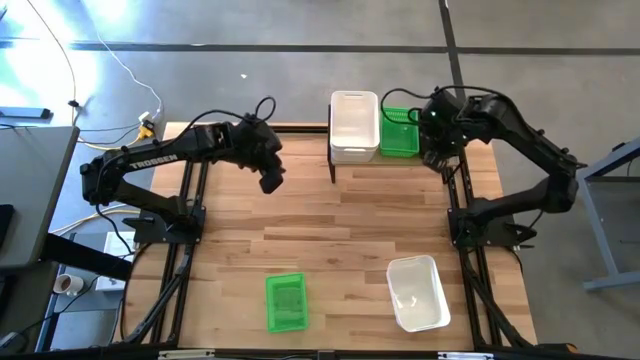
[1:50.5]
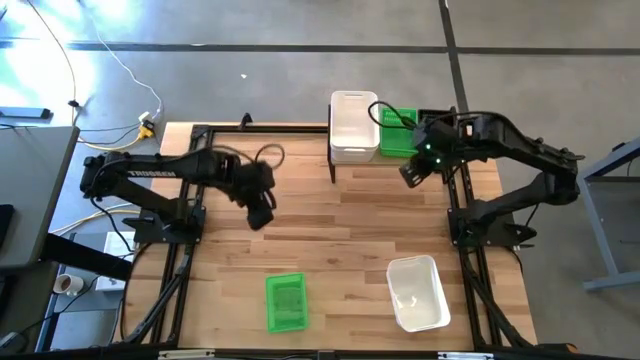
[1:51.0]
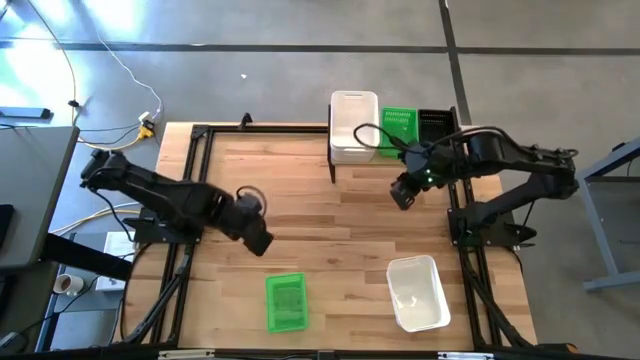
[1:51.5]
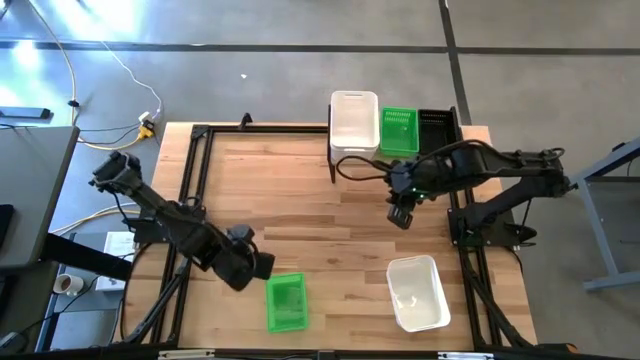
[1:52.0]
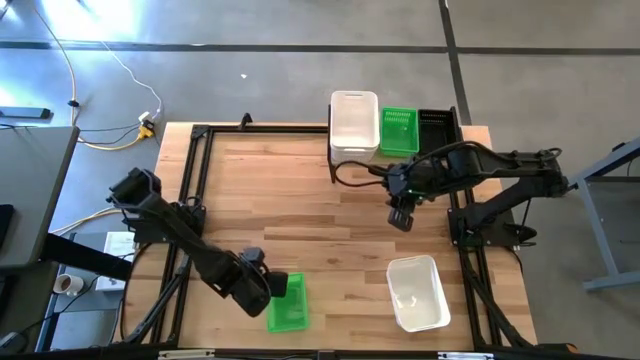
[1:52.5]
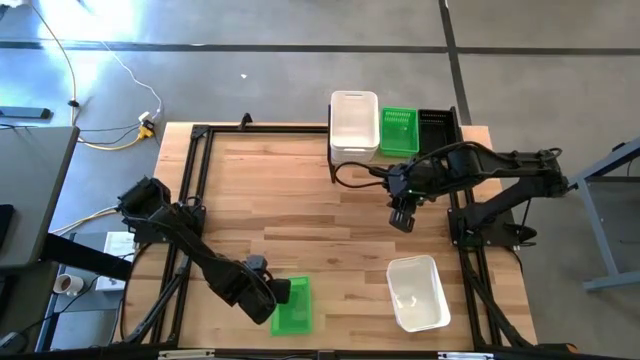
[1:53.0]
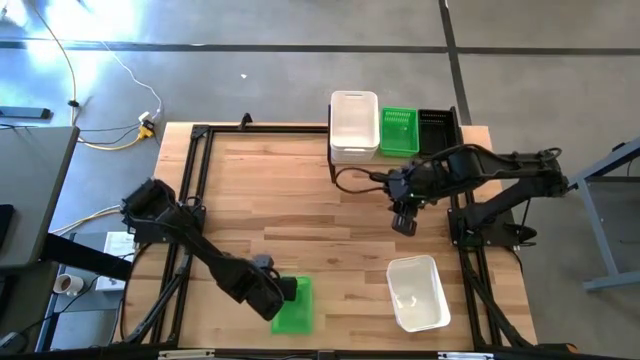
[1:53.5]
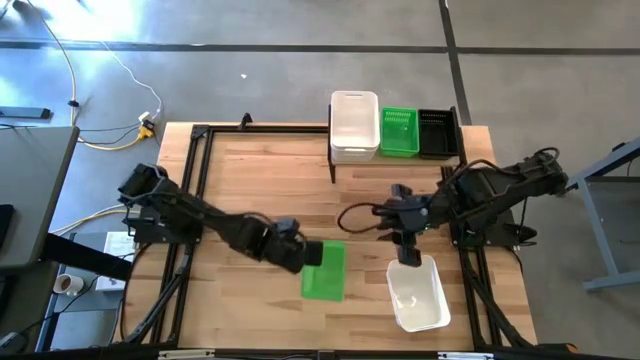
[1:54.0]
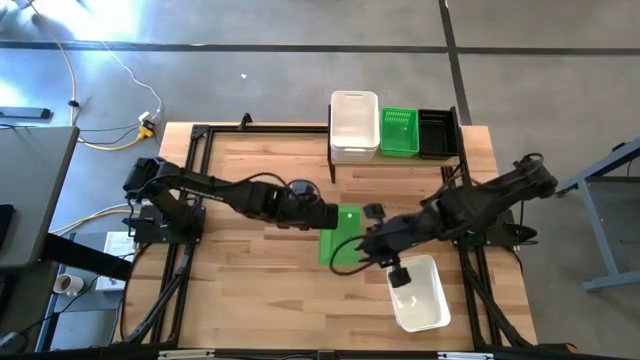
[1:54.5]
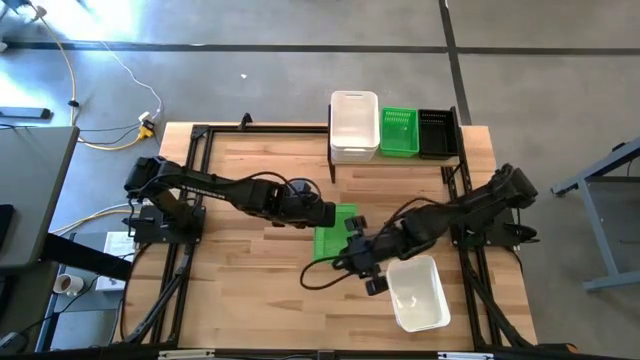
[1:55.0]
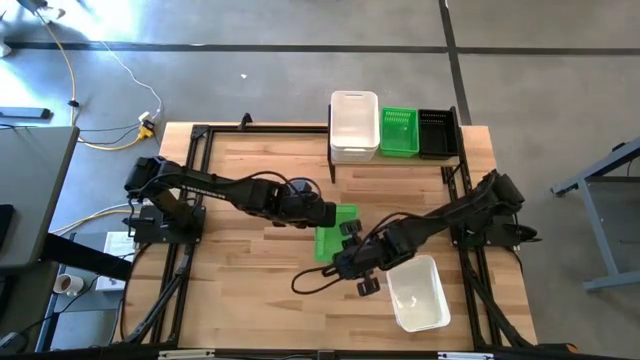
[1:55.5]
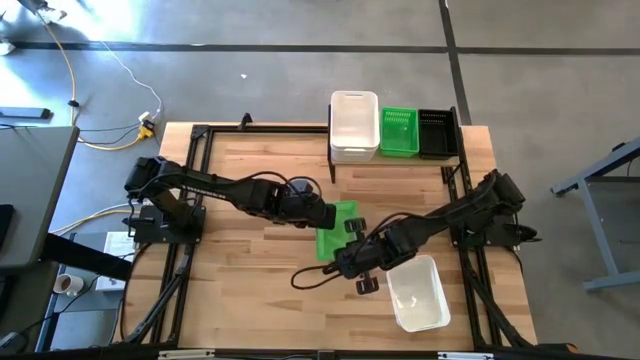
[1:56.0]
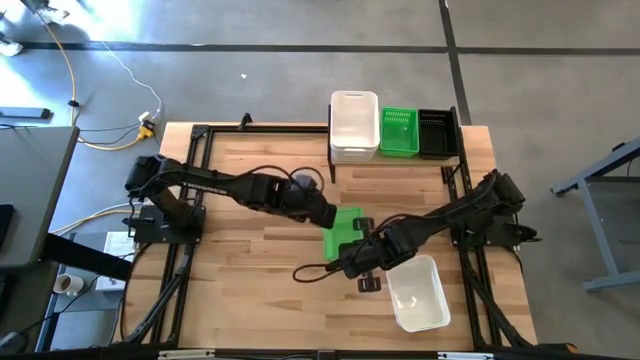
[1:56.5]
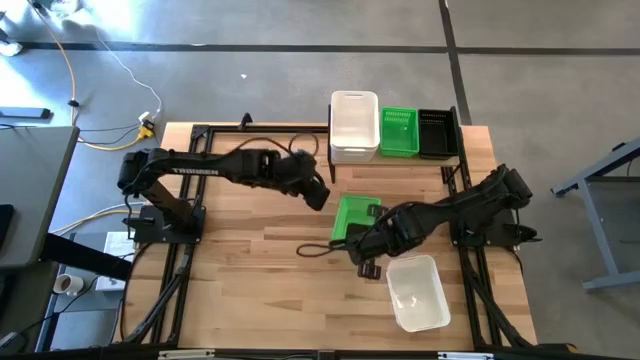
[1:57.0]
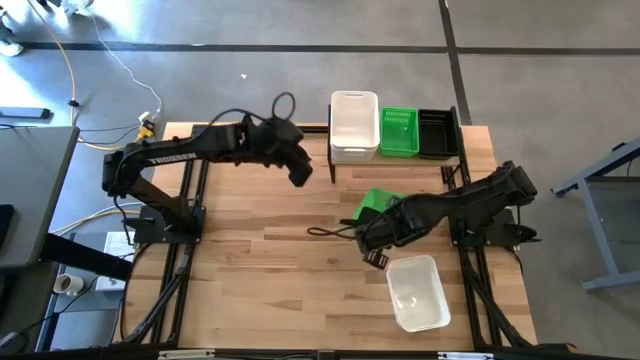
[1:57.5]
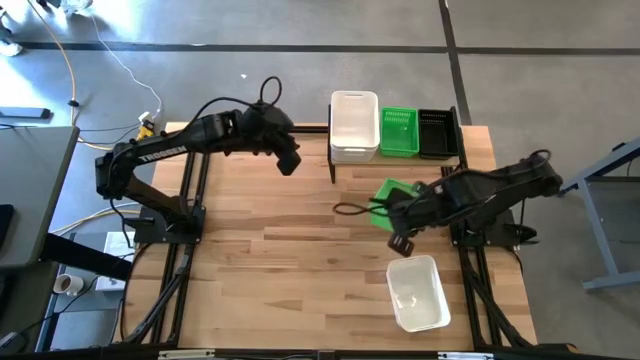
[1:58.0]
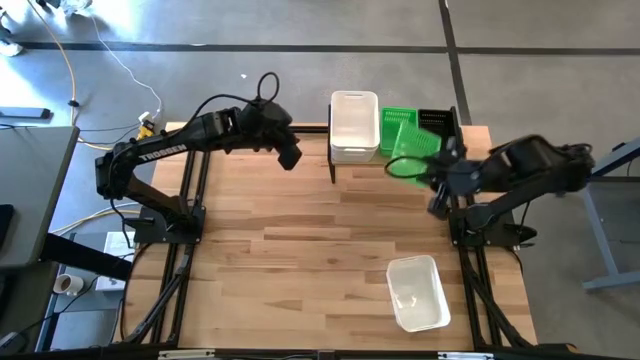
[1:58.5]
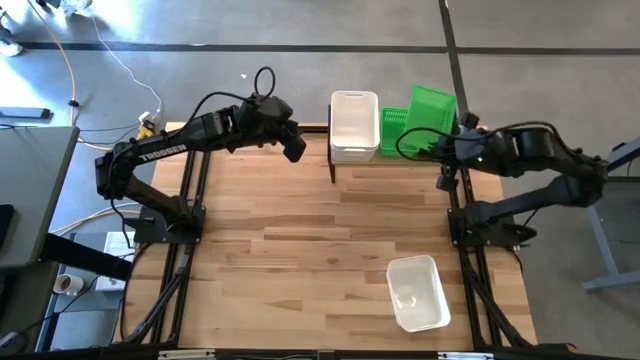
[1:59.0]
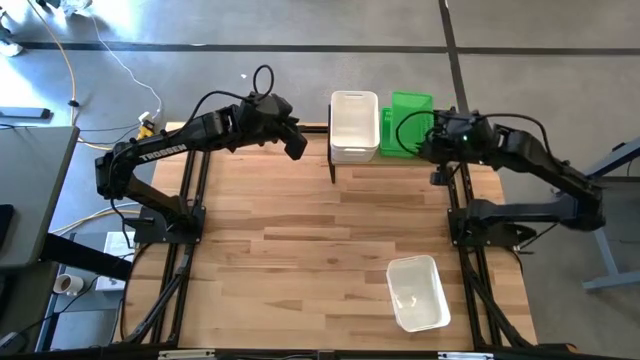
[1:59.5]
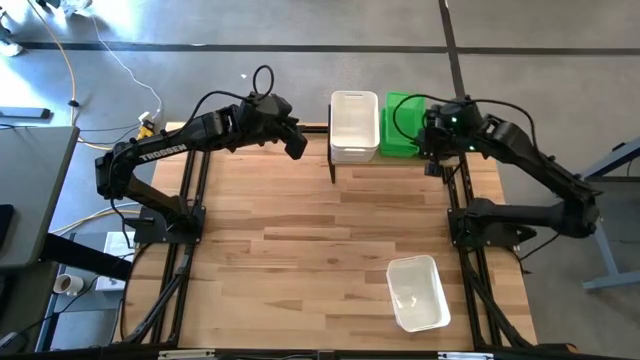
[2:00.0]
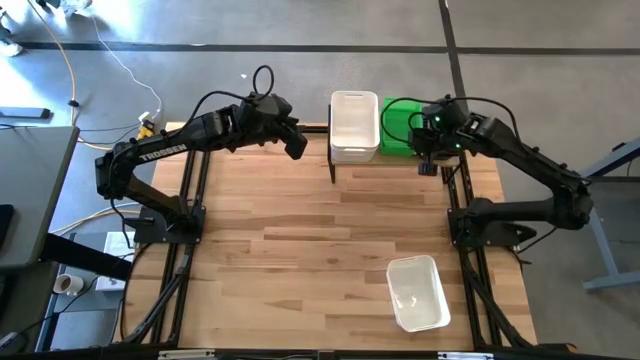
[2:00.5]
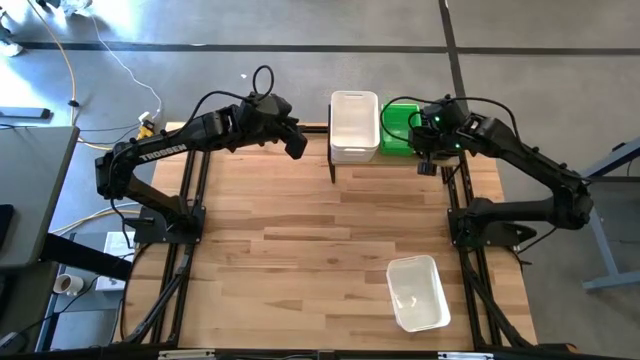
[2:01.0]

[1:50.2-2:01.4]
Task: Stack baskets on shelf by color
Stack the green bin on top of the green bin

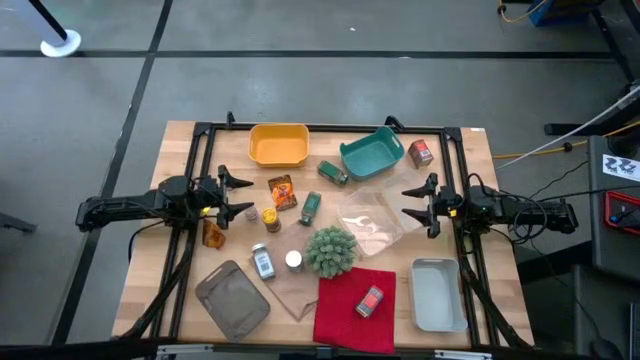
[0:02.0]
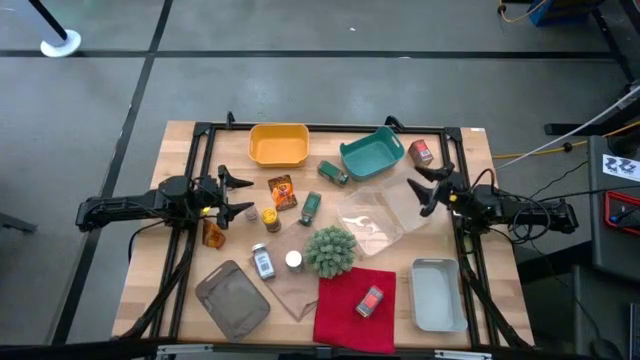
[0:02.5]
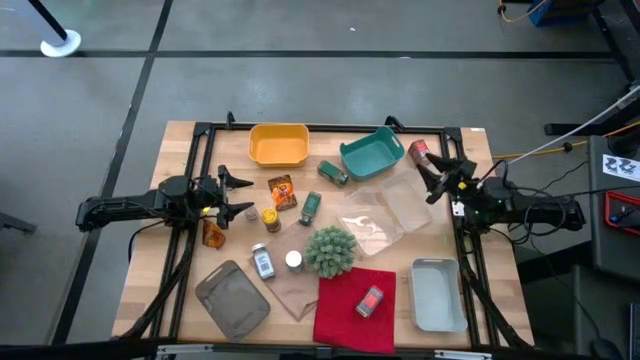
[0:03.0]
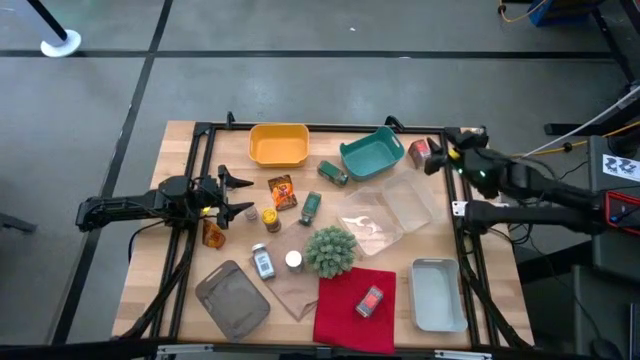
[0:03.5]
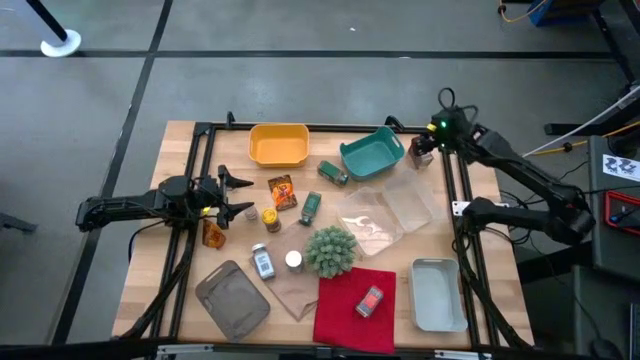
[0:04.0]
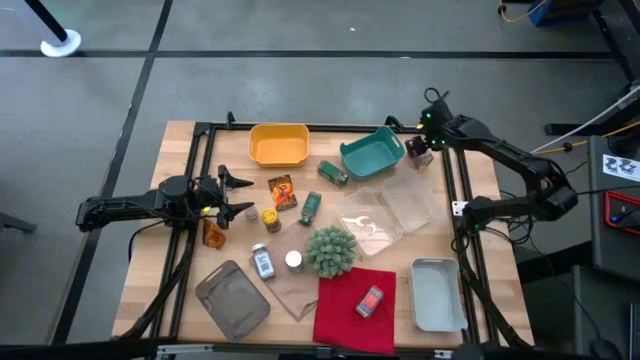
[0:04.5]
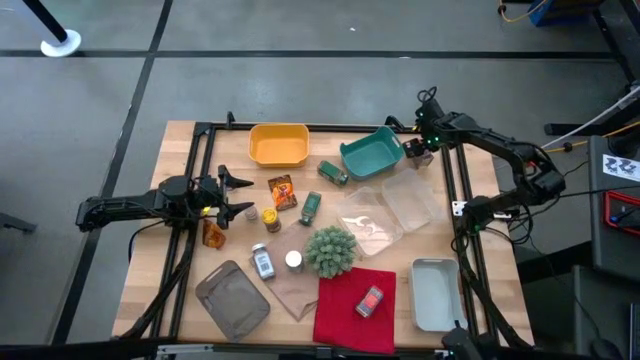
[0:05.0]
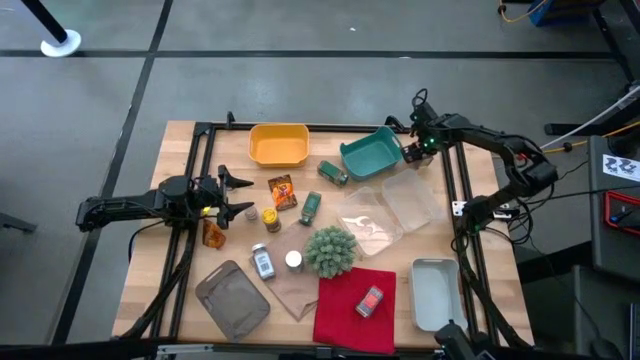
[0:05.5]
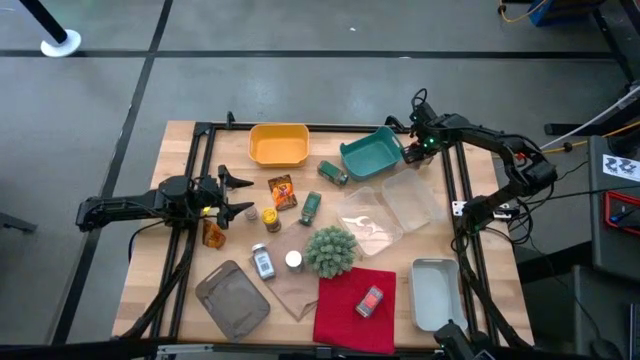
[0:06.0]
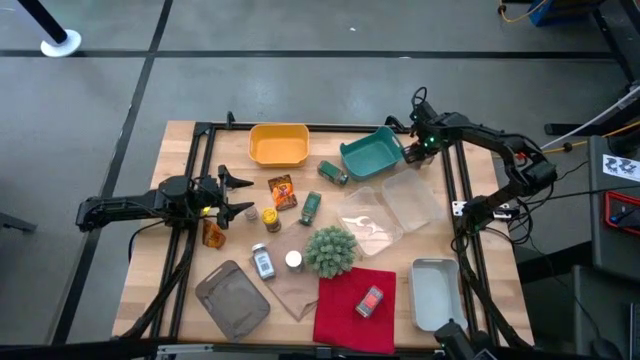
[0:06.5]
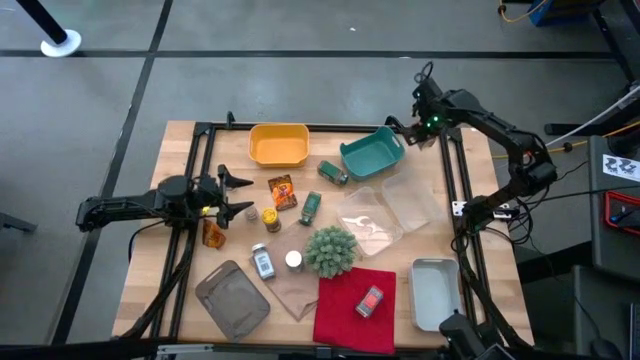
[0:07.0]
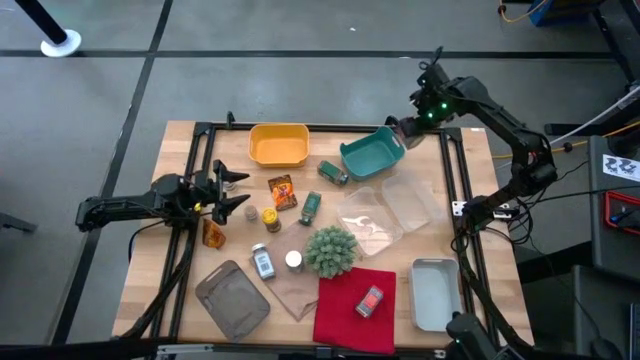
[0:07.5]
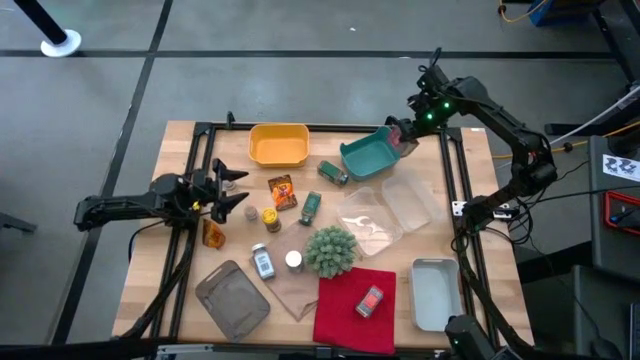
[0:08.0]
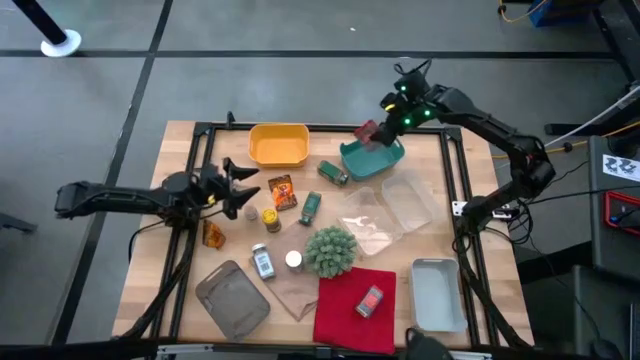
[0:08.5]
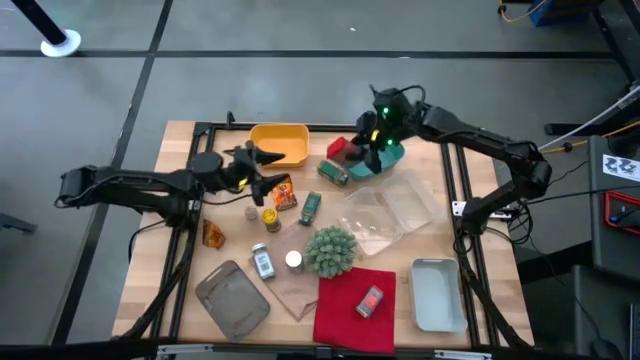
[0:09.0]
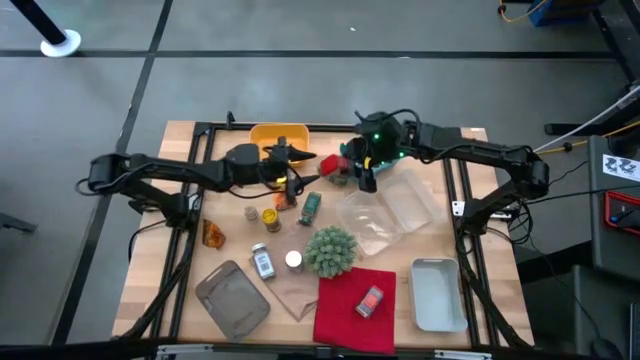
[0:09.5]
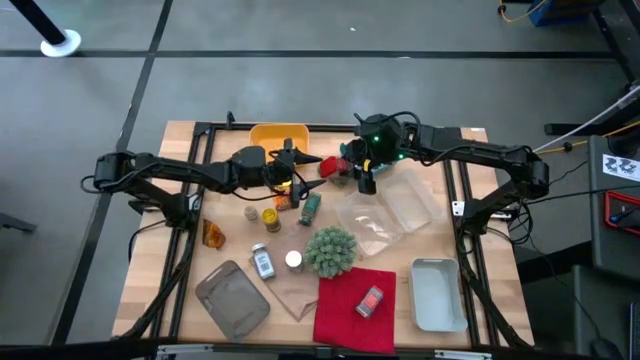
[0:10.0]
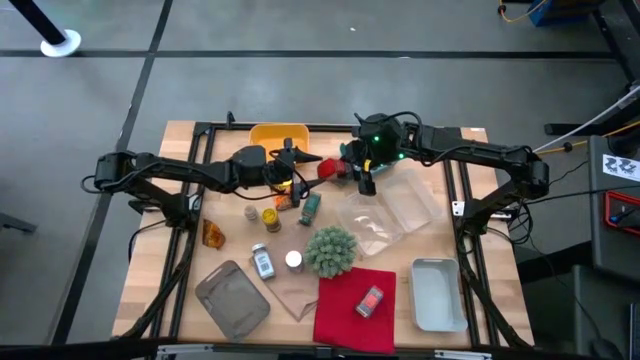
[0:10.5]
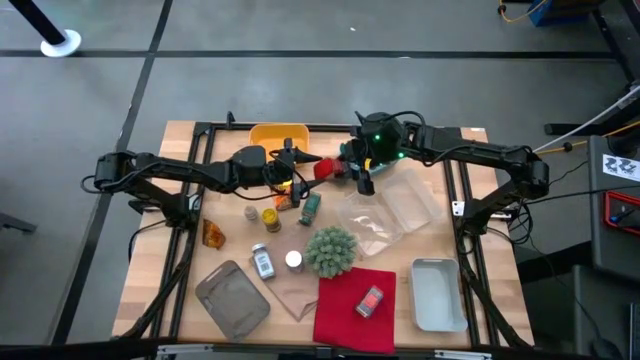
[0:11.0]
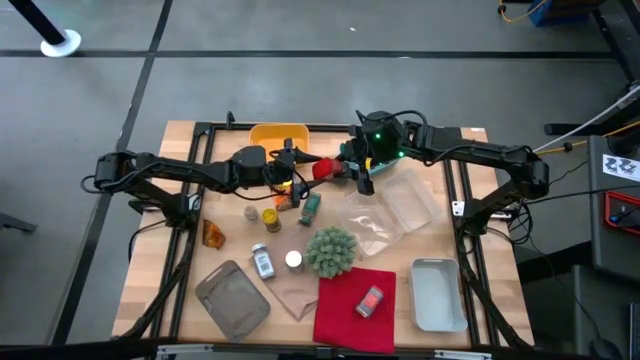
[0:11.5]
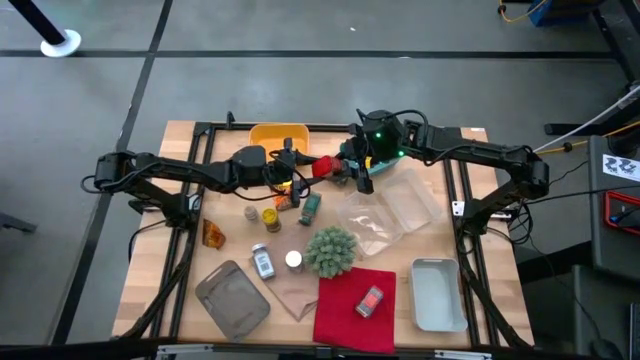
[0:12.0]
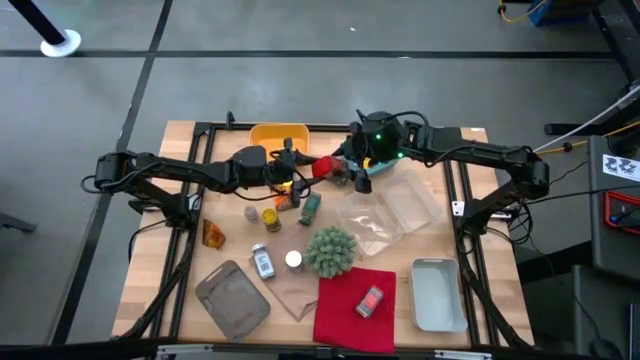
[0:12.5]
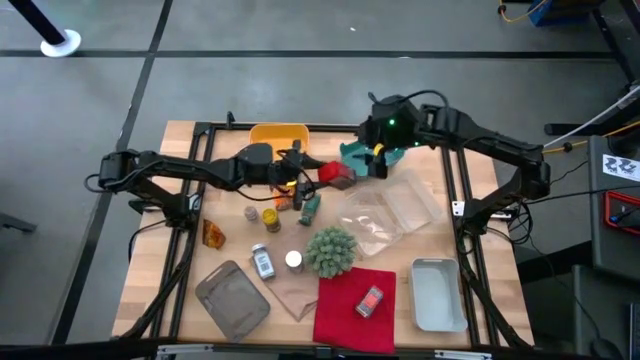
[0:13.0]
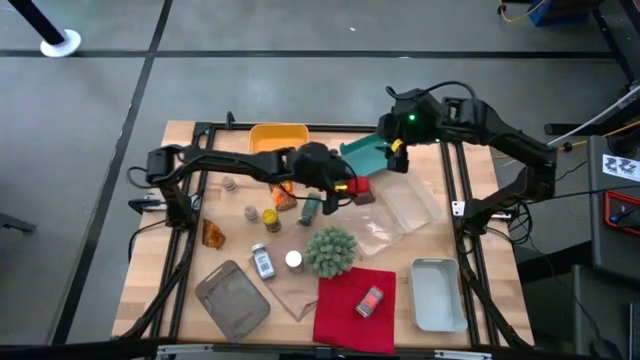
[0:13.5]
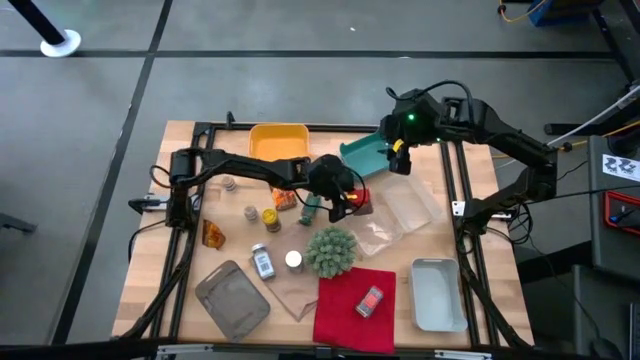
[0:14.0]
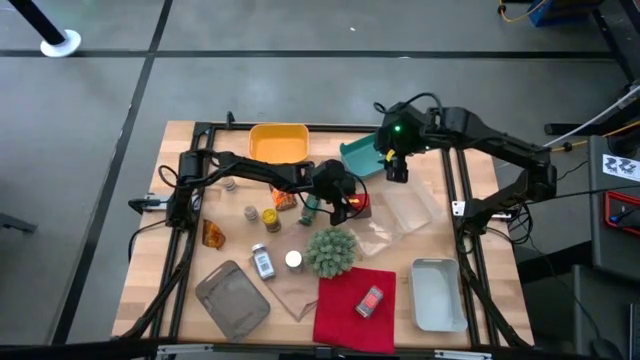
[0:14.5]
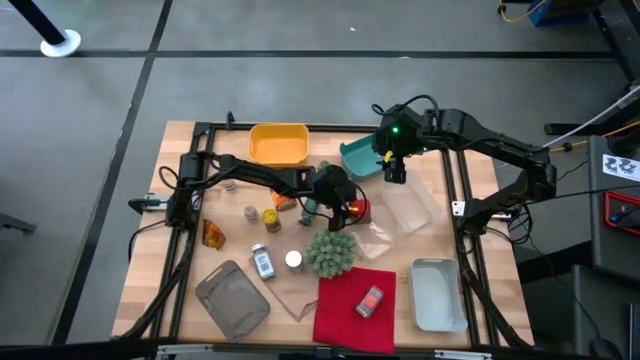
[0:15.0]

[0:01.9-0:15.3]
Task: Sort spices by type
Put the top red seasoning can into the left transparent bin
